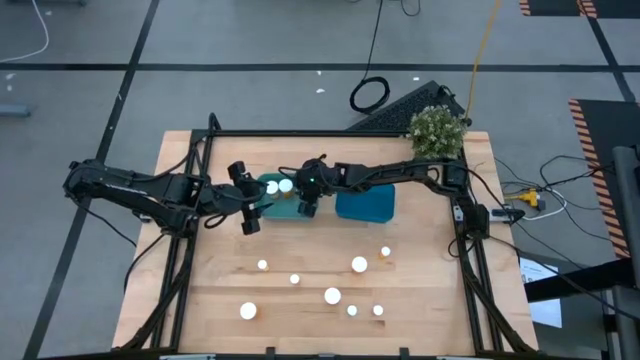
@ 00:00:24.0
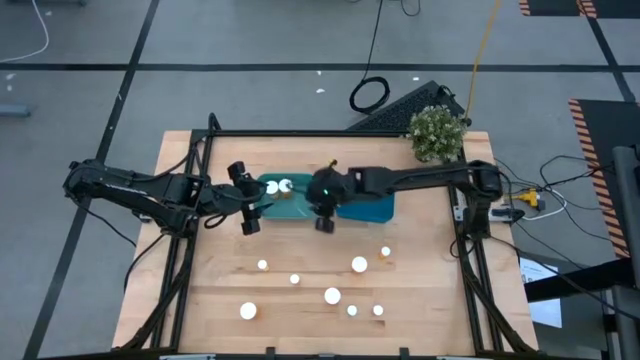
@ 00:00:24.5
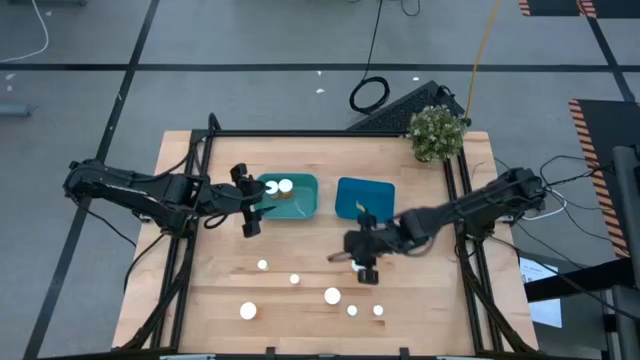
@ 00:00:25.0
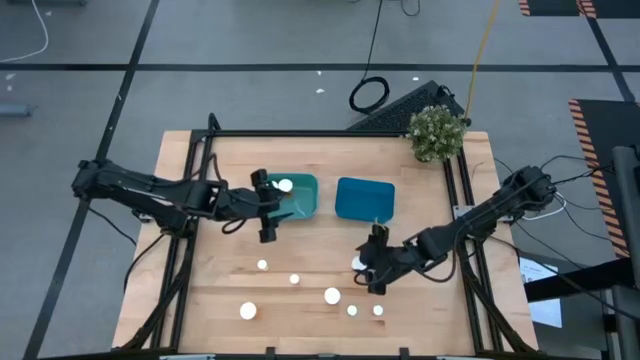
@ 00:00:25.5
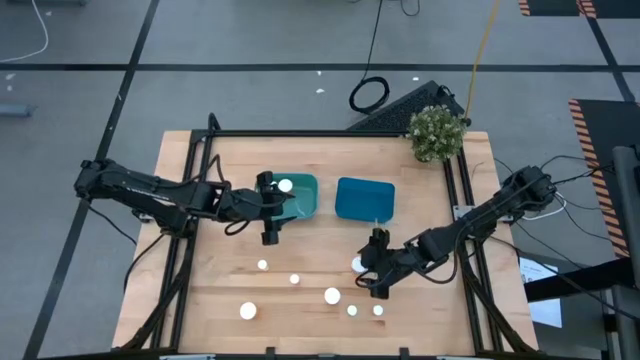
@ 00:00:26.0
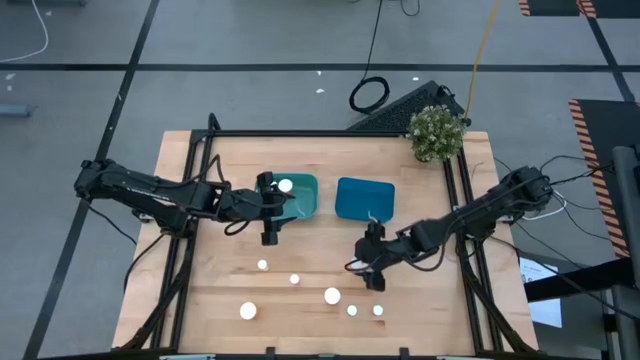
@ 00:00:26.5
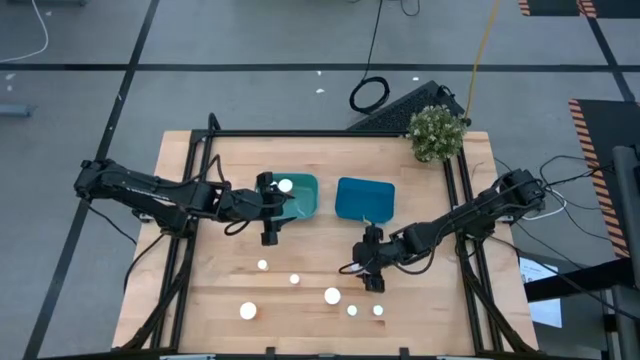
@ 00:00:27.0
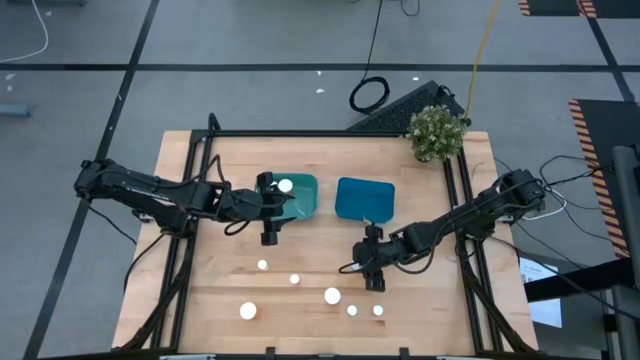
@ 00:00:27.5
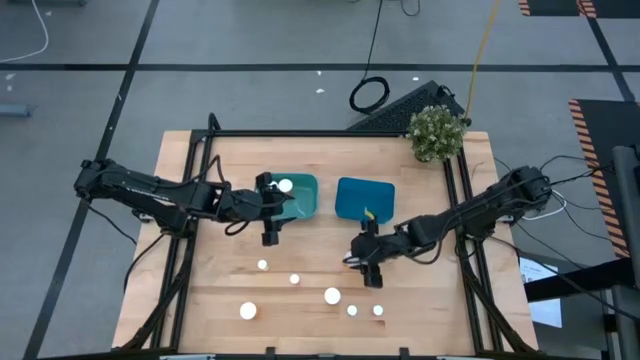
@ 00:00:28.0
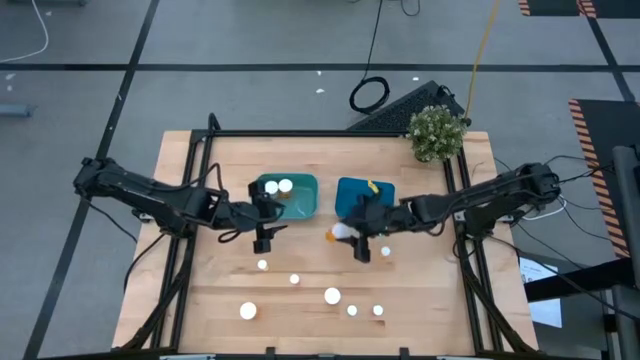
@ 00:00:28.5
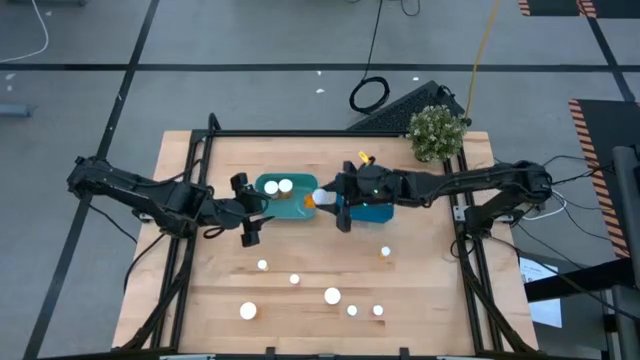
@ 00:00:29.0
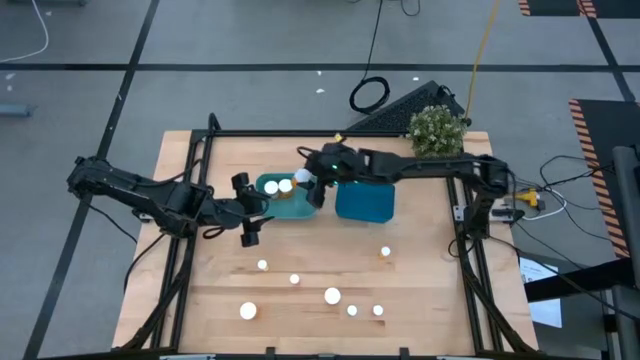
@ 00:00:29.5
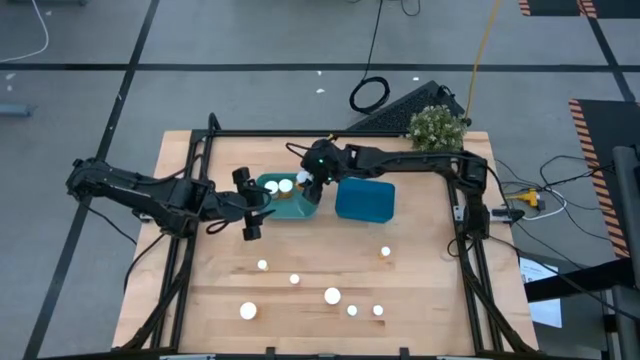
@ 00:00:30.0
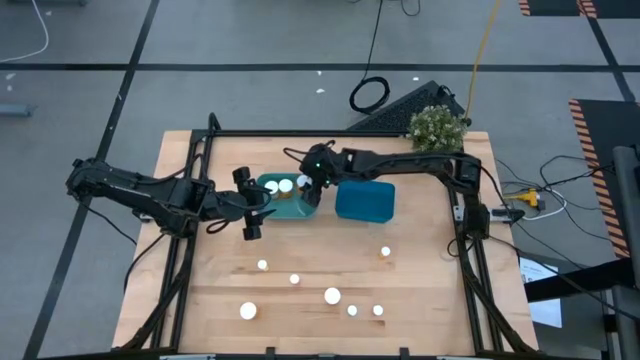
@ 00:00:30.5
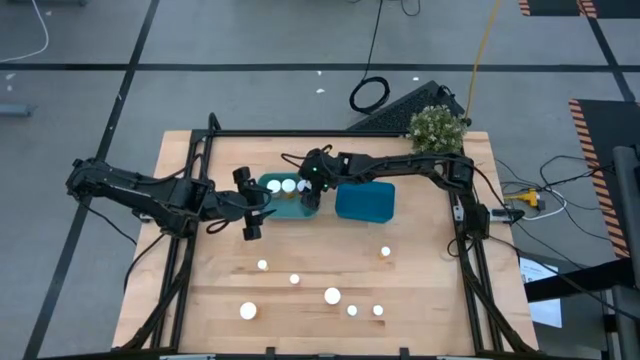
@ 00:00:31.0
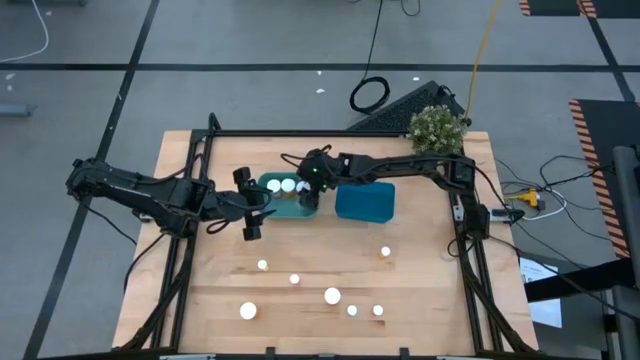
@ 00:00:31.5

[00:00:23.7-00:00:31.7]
Task: Pick and place medicine bottles into bin by pill shape (circle, oval)
Put the large orange capsule bottle into the green bin

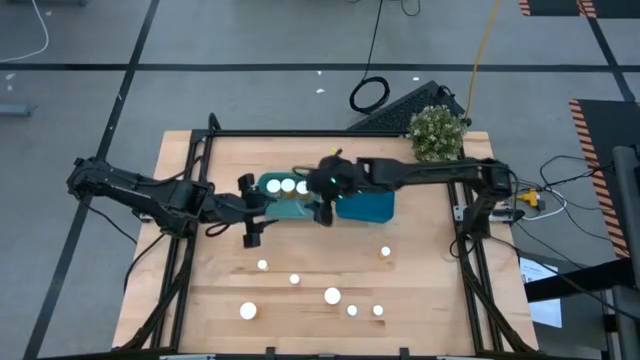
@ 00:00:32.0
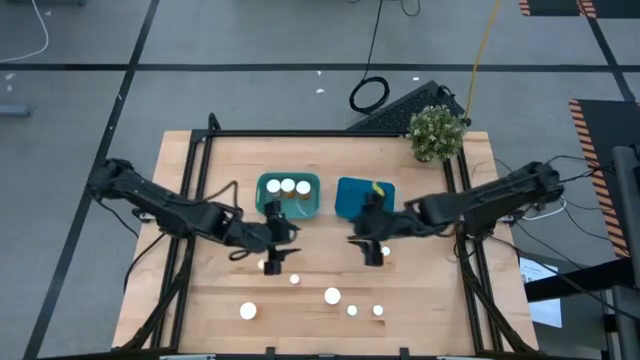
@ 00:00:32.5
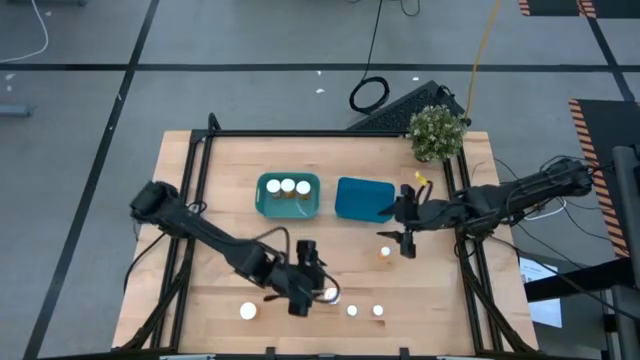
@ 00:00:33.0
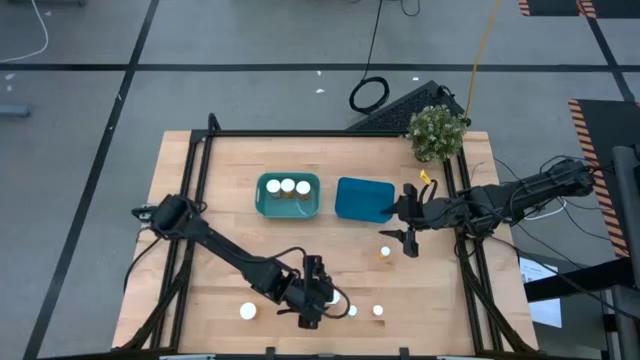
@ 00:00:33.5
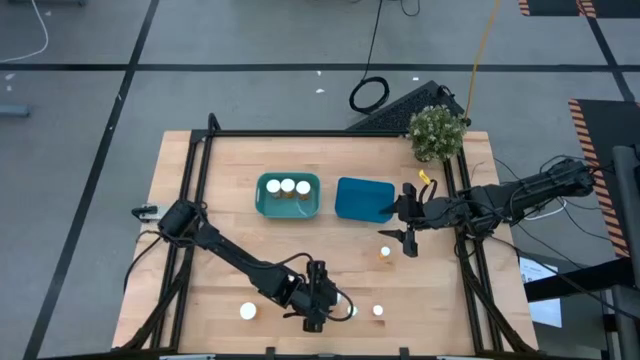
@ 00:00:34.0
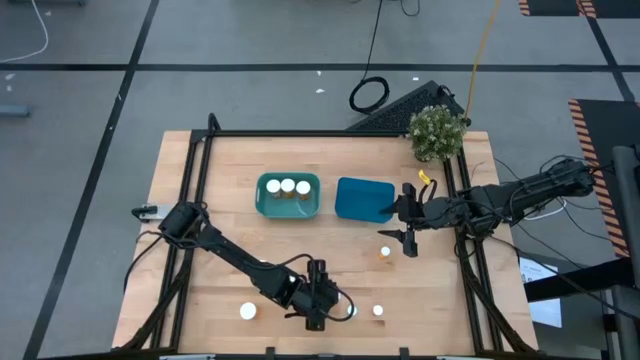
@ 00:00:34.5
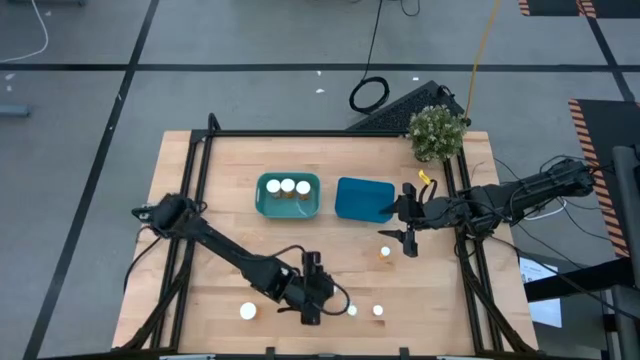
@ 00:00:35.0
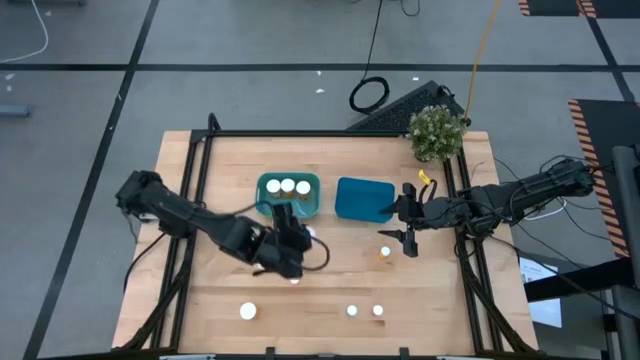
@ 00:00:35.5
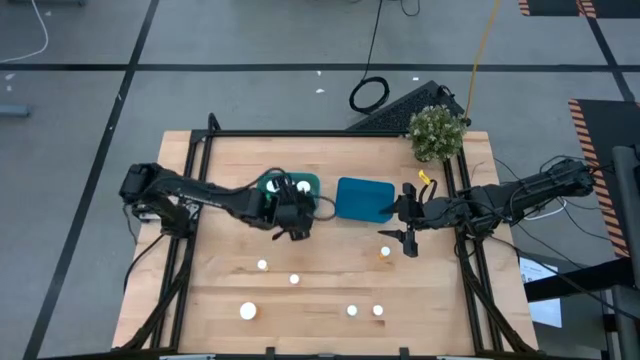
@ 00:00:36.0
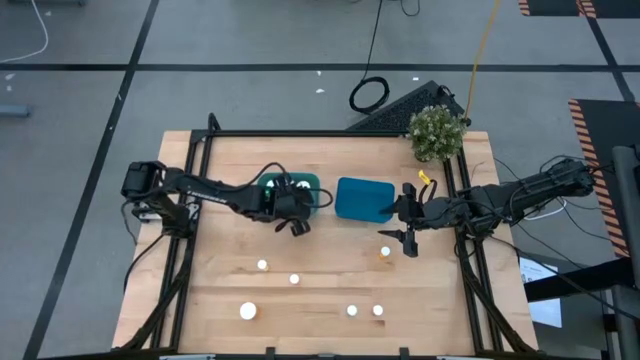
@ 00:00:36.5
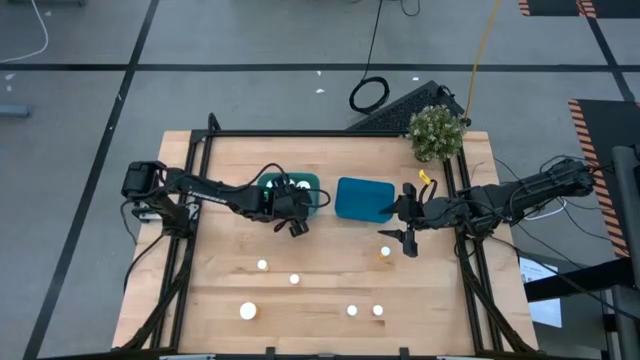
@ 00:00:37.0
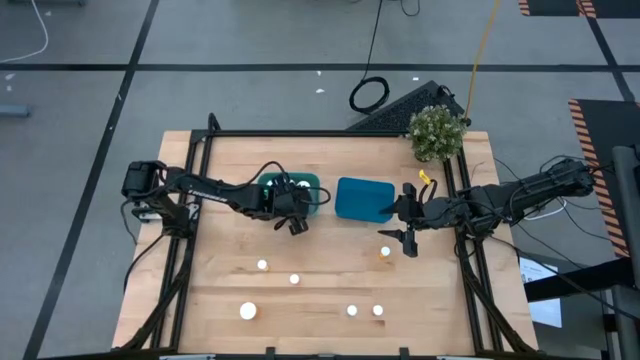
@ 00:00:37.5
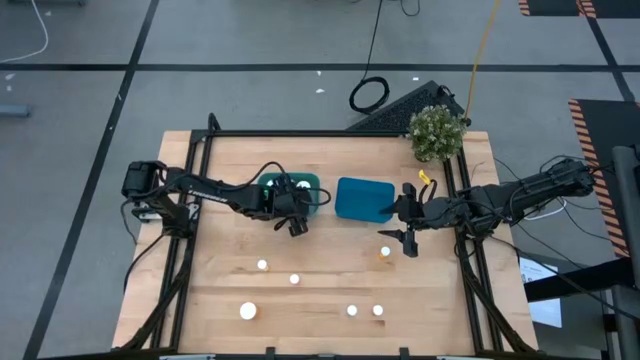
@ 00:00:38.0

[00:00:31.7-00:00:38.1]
Put the large orange capsule bottle into the green bin

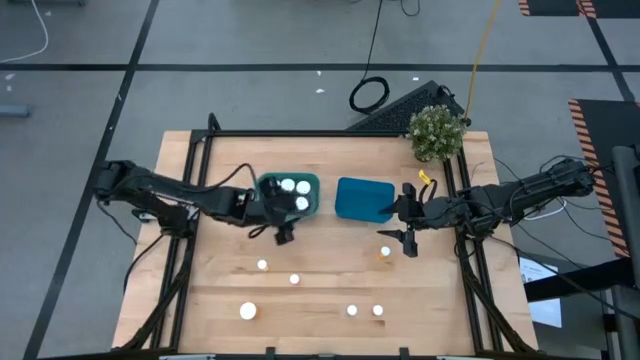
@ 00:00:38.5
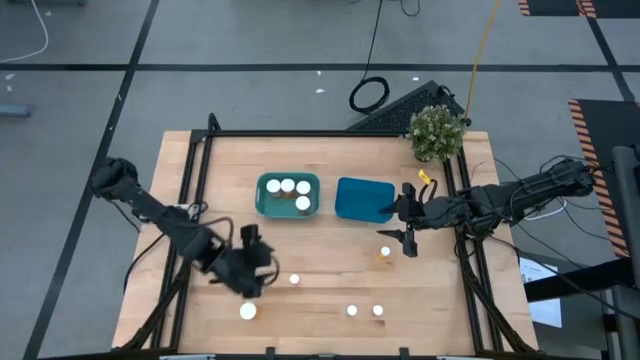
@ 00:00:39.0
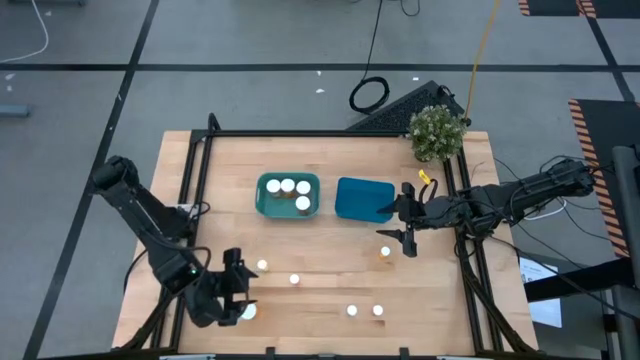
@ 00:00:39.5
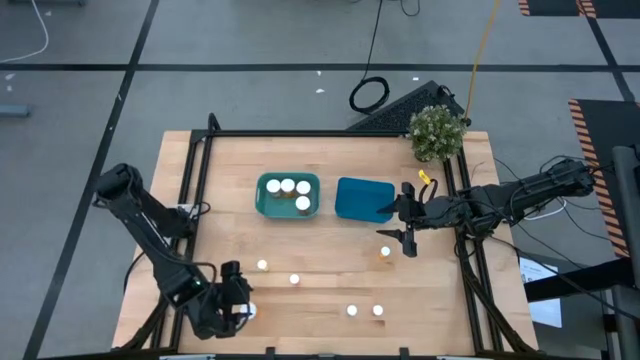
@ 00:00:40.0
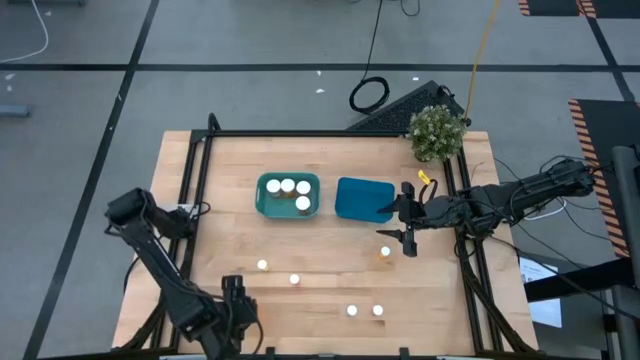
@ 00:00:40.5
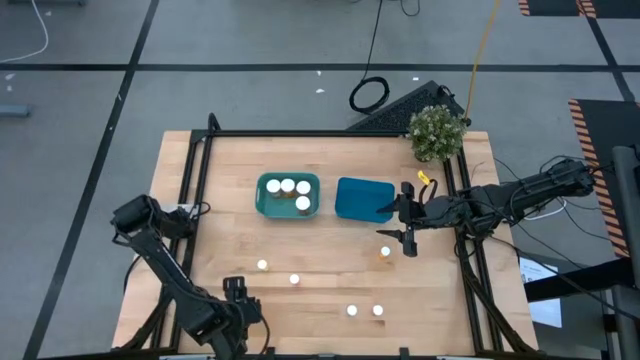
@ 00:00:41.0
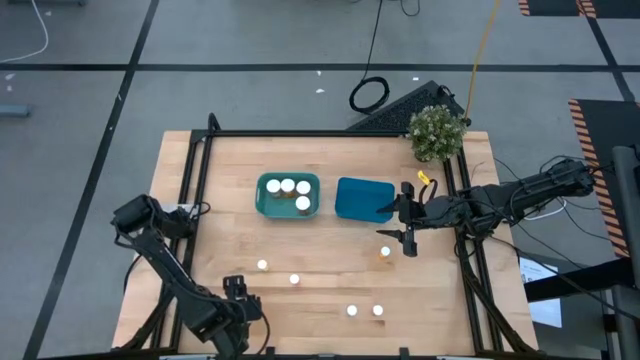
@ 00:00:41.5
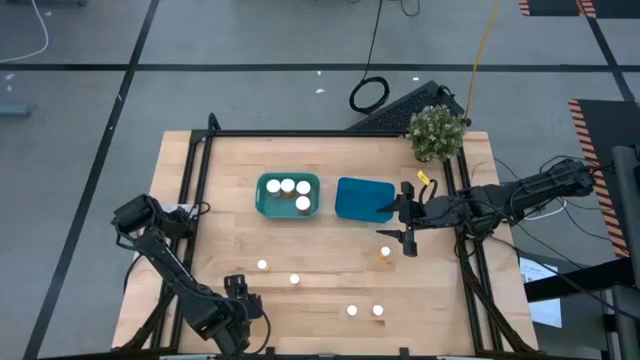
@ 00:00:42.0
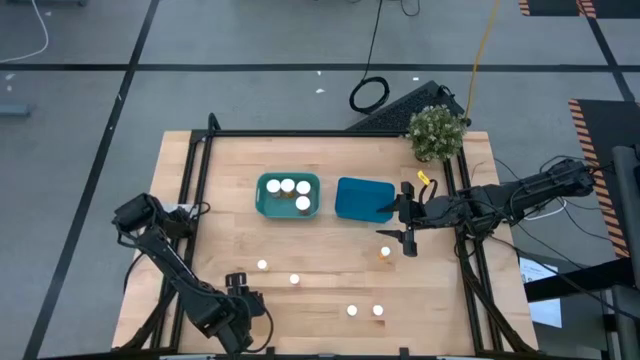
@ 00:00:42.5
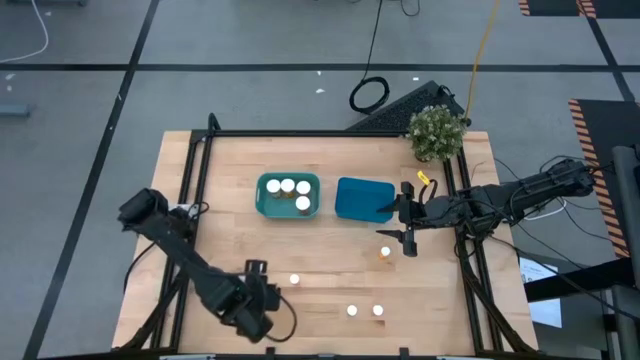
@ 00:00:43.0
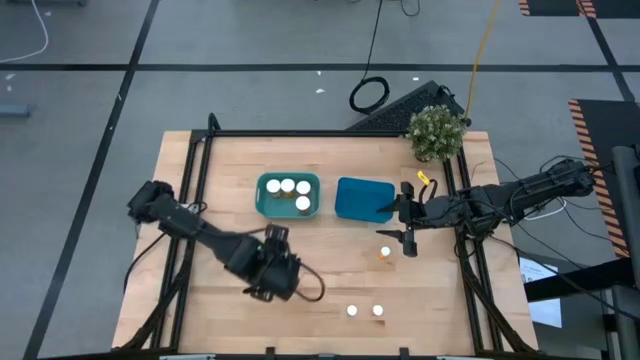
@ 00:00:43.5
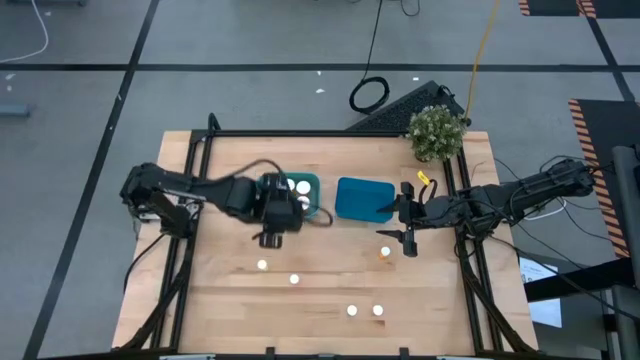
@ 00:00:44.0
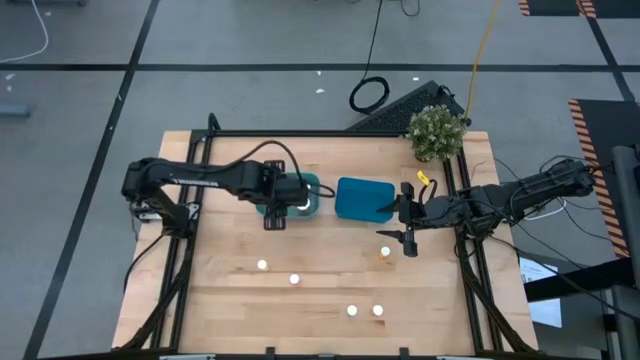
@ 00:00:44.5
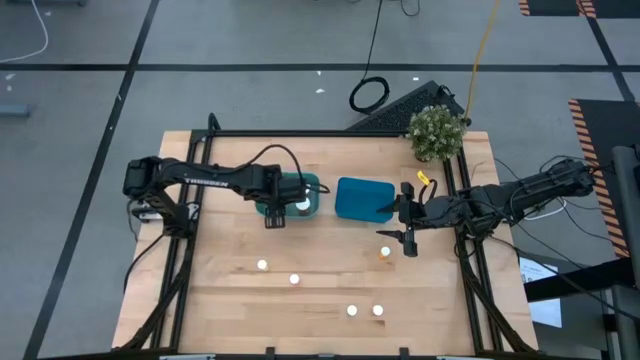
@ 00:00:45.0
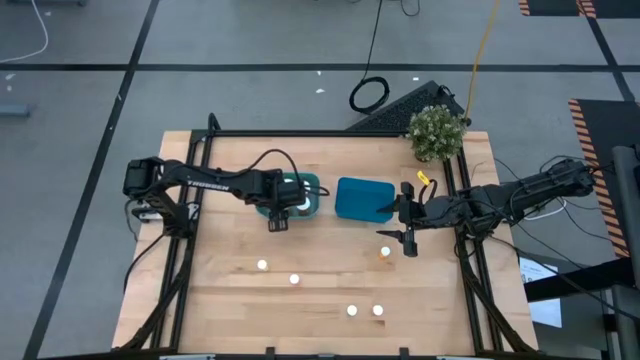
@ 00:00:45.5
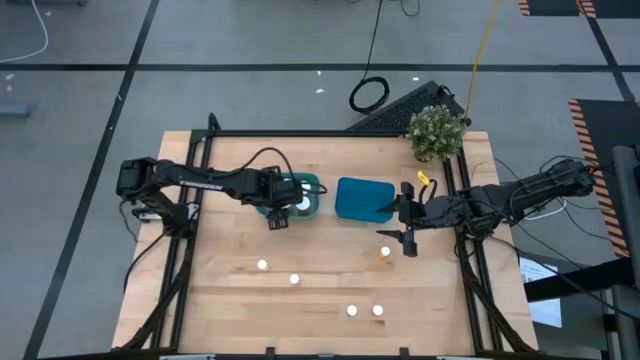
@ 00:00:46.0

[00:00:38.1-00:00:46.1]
Put the large orange capsule bottle into the green bin
